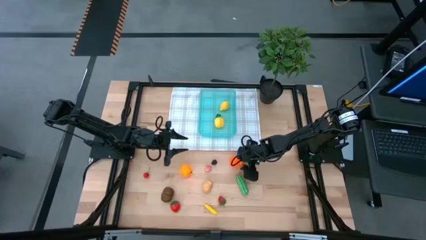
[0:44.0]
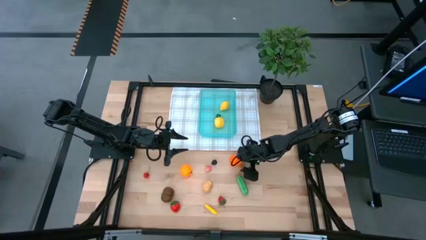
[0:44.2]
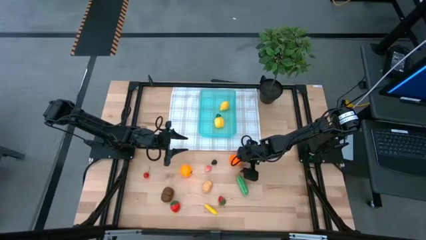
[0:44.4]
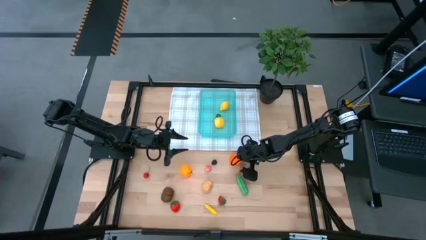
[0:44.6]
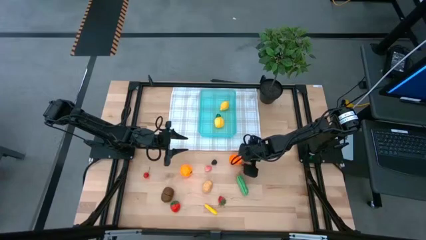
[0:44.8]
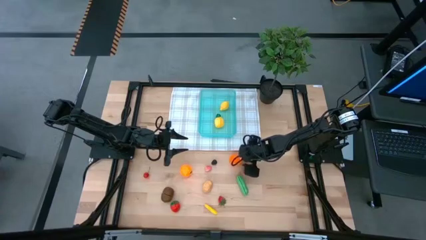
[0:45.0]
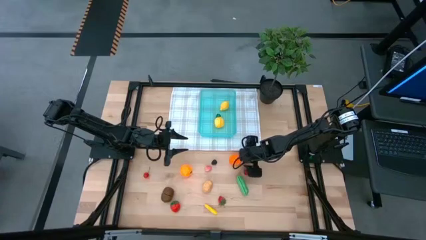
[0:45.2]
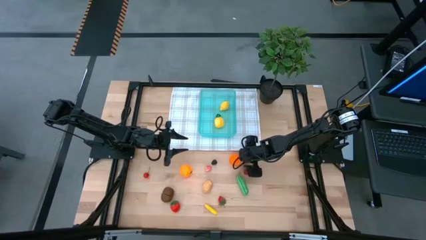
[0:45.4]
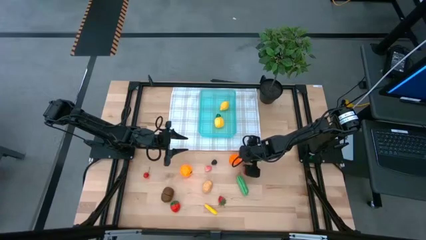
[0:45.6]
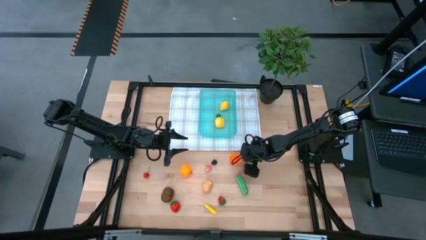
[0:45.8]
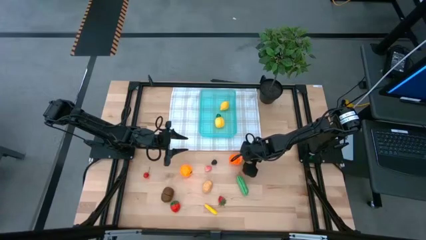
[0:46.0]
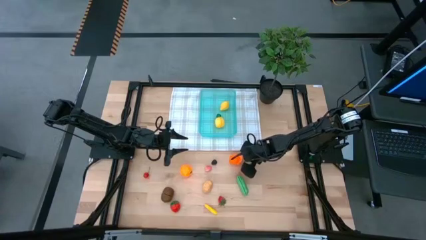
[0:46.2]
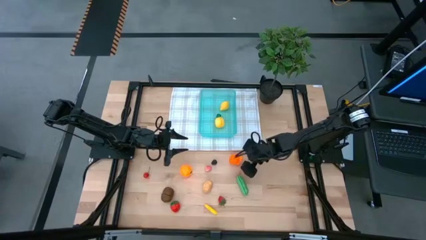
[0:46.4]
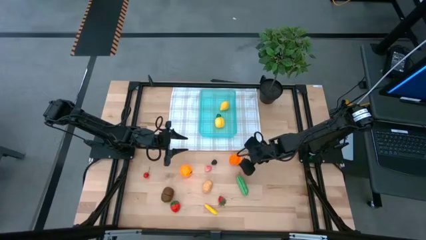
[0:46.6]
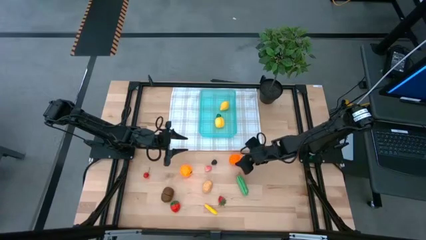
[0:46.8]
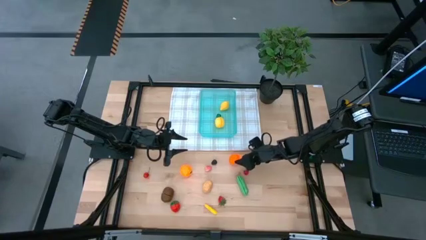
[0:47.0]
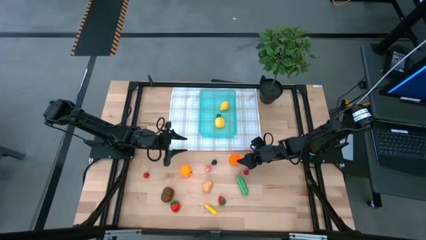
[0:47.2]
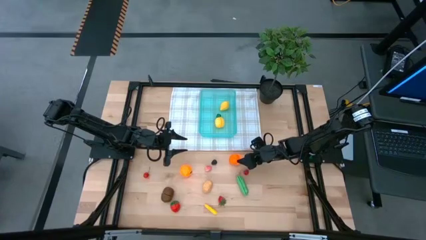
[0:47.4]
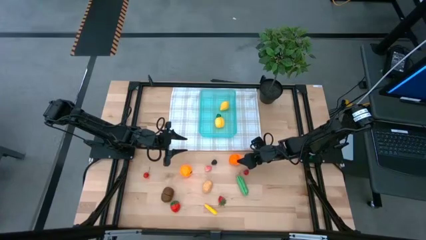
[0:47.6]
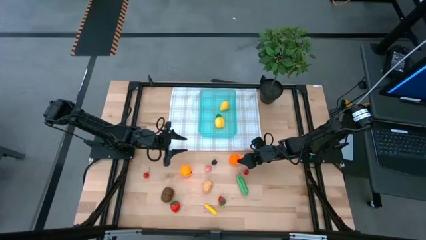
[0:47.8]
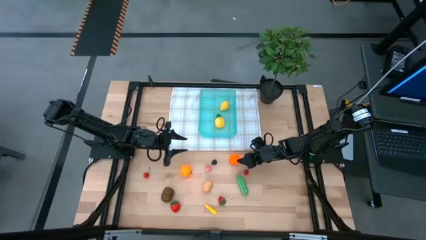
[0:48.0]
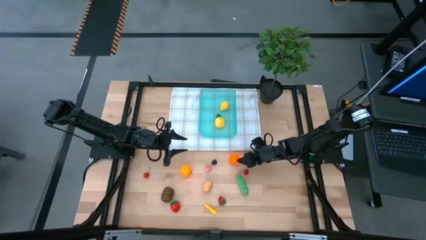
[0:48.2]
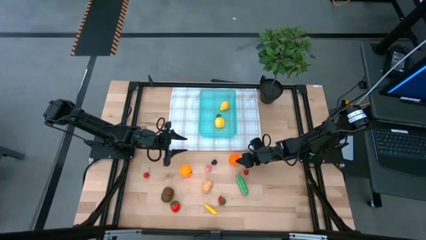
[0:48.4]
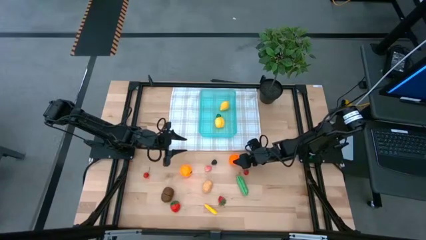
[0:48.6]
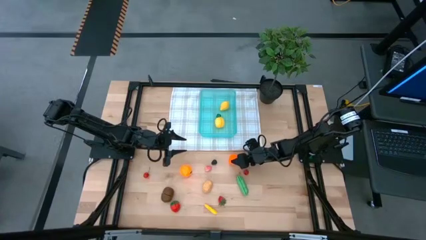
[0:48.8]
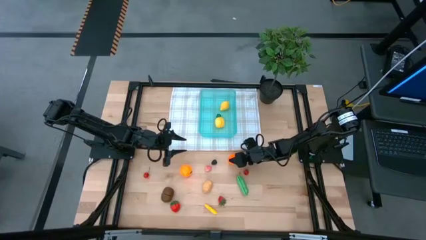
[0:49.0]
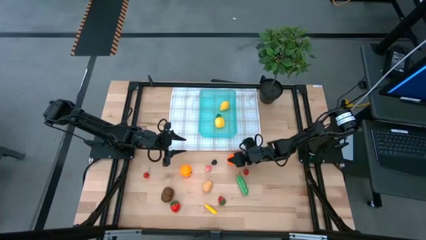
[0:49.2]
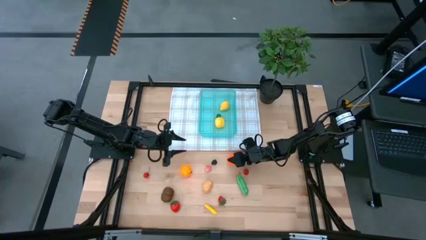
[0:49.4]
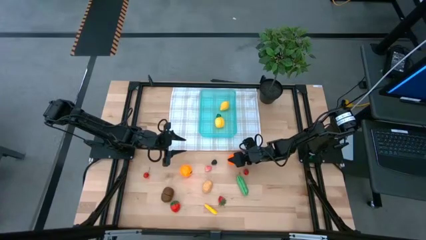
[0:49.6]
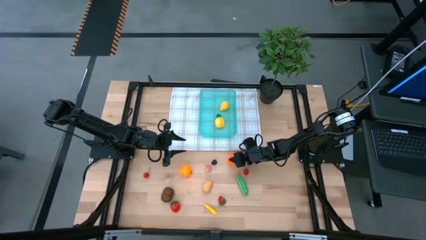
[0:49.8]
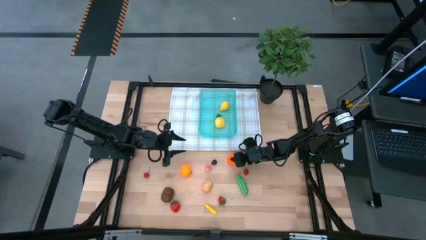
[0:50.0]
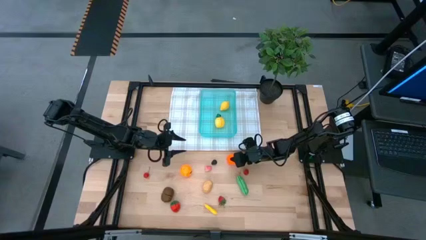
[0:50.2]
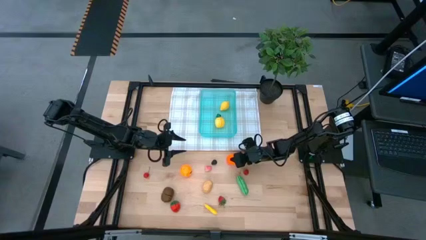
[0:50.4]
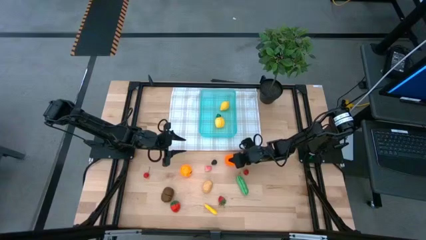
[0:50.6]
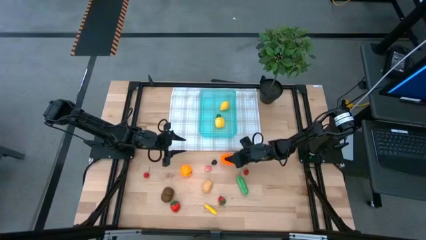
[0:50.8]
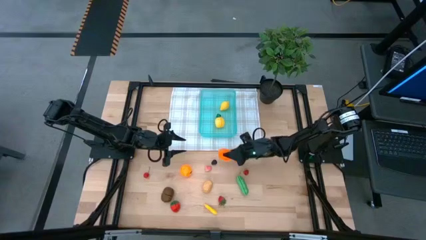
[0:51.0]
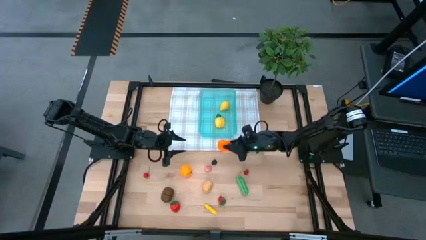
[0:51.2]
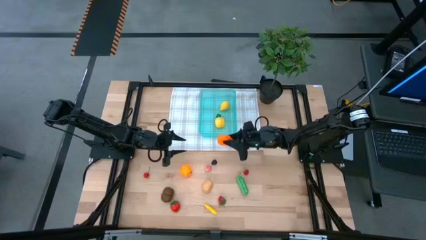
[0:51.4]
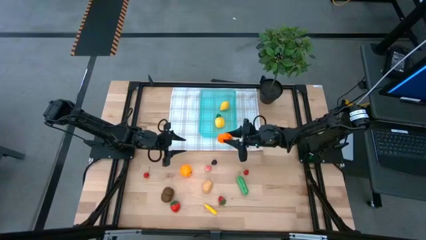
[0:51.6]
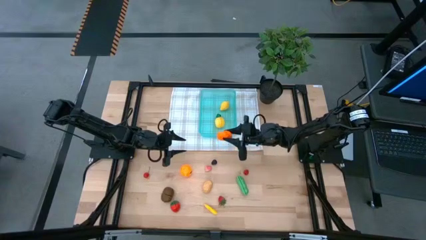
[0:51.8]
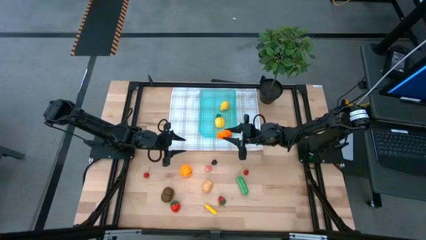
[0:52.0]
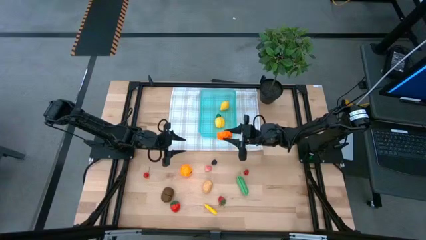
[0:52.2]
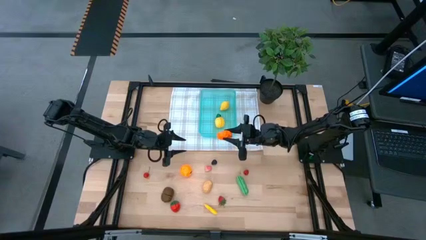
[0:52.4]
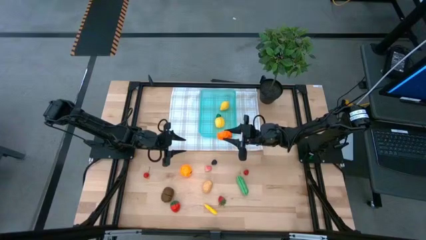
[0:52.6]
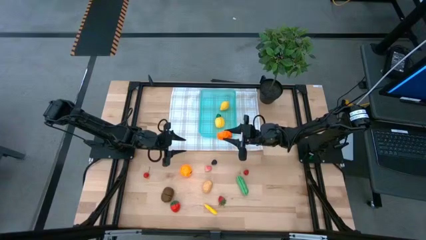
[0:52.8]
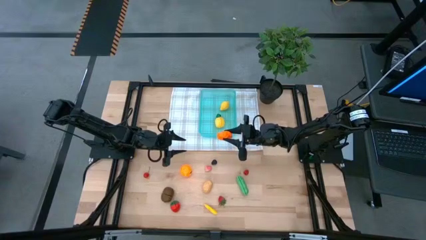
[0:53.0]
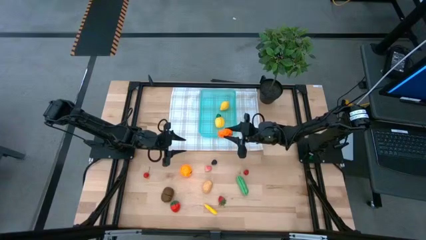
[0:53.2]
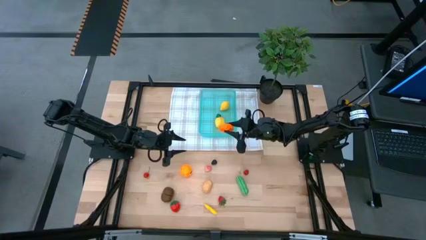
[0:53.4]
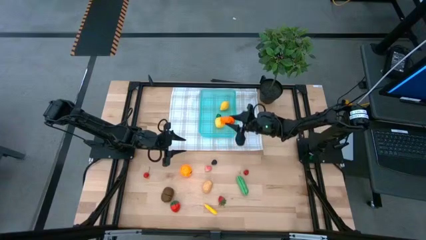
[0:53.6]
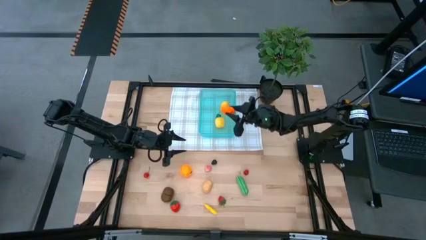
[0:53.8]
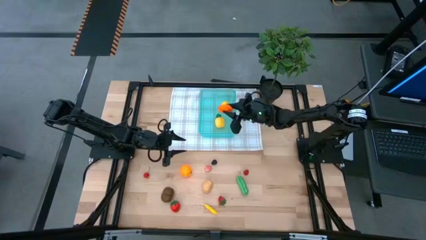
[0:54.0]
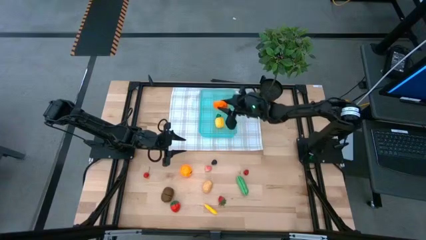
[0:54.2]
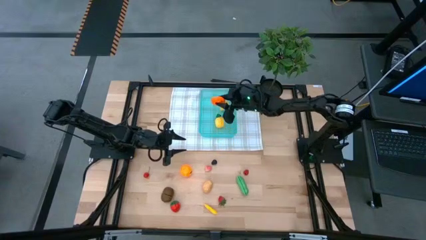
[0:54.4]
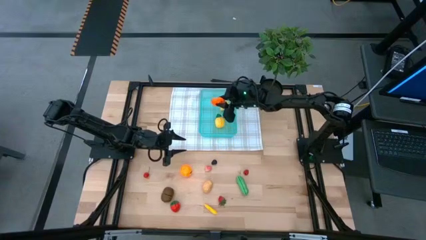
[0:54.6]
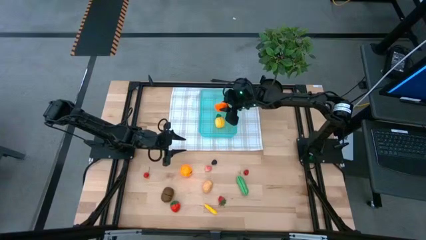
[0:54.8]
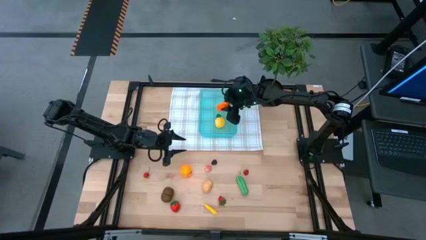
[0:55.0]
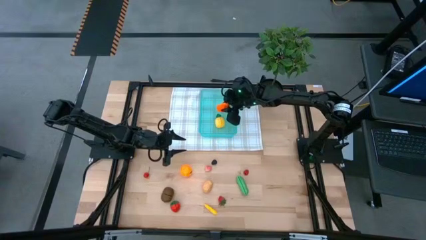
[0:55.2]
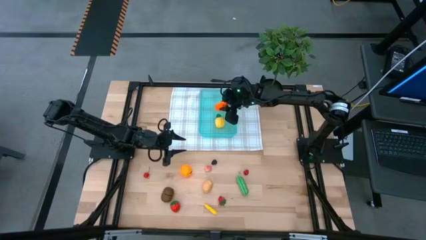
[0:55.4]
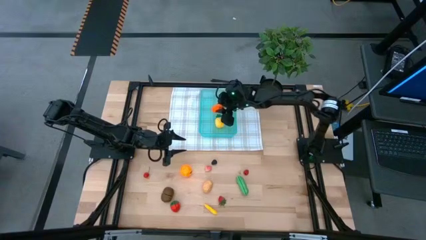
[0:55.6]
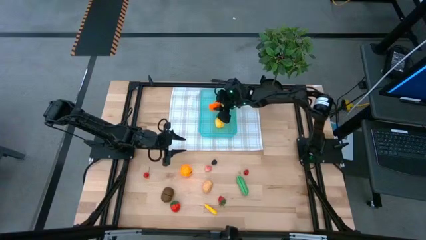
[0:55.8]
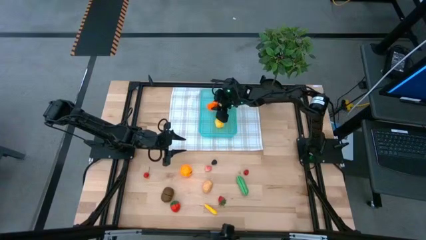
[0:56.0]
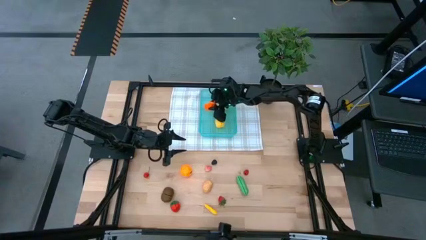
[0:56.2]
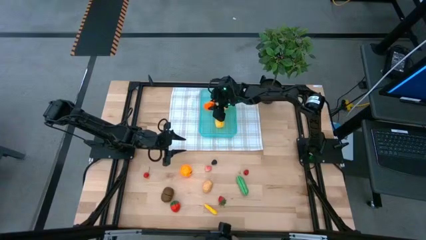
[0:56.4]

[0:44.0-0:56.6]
Task: Pick and placing Produce into tupperware
Put the orange pumpkin into the green bin

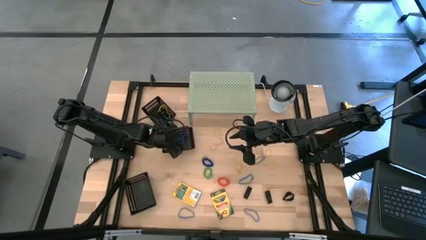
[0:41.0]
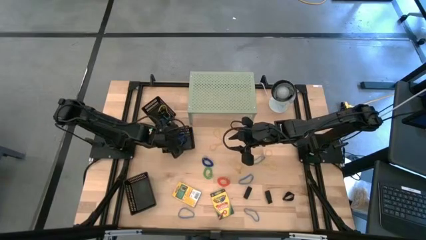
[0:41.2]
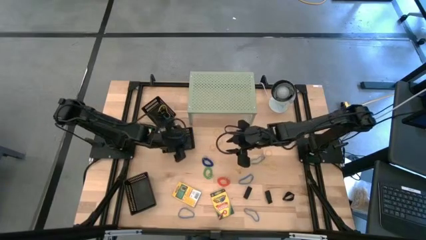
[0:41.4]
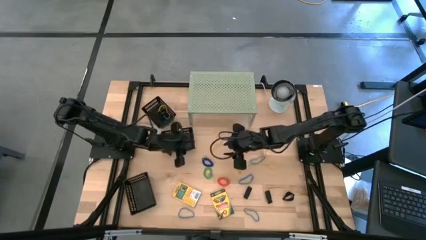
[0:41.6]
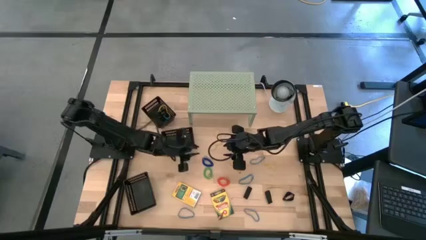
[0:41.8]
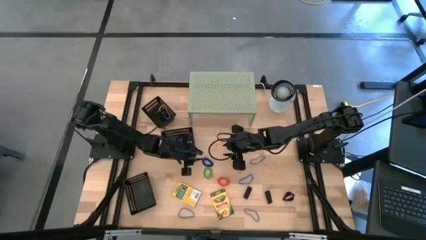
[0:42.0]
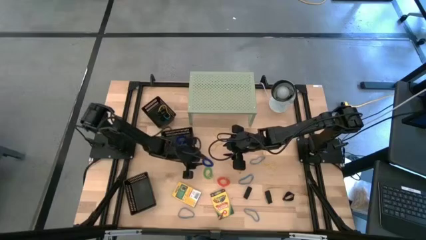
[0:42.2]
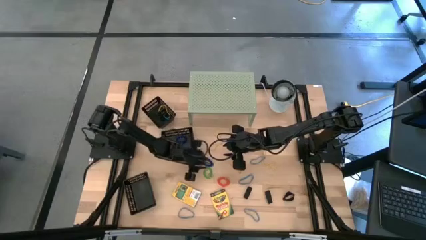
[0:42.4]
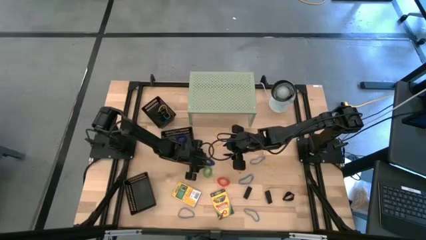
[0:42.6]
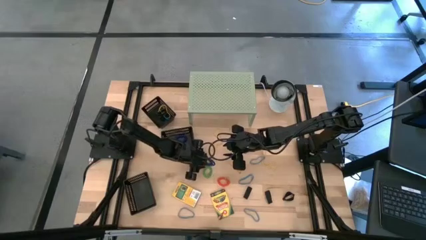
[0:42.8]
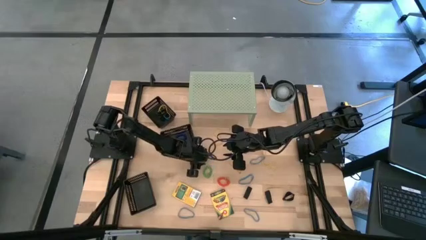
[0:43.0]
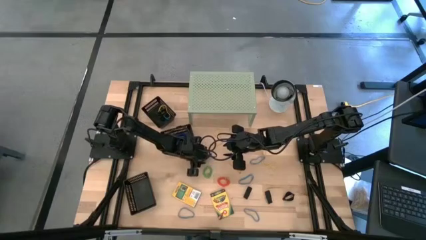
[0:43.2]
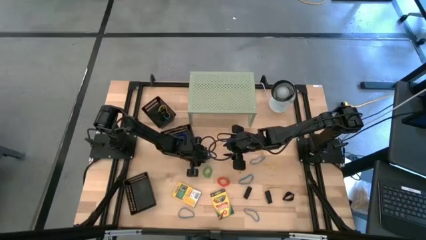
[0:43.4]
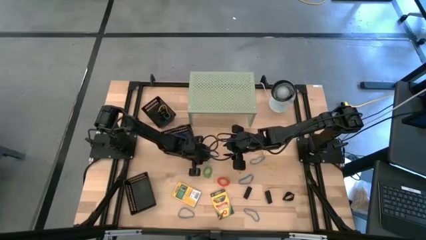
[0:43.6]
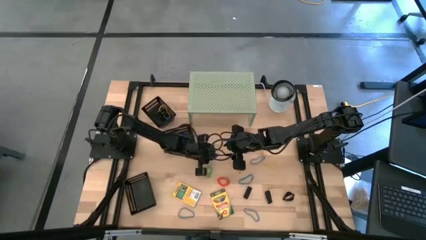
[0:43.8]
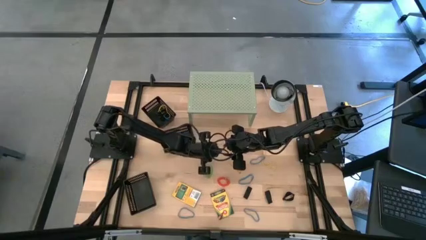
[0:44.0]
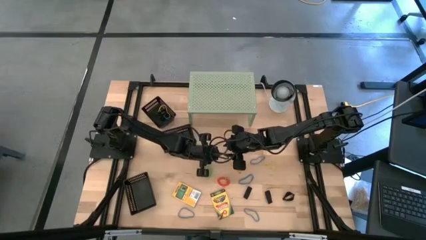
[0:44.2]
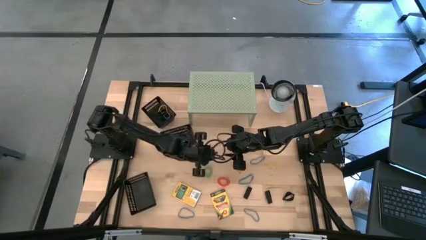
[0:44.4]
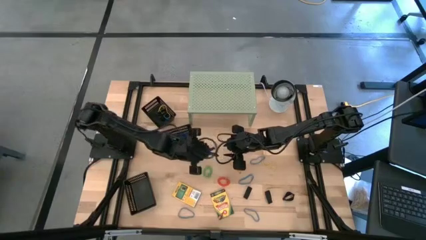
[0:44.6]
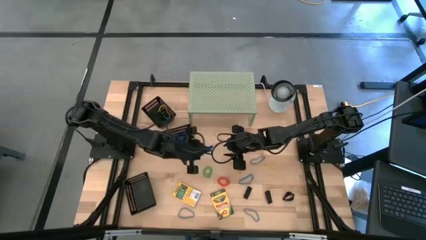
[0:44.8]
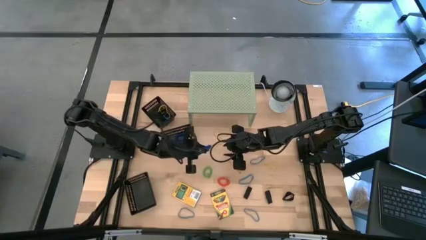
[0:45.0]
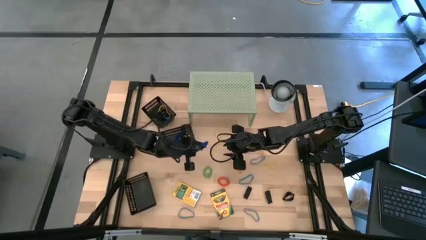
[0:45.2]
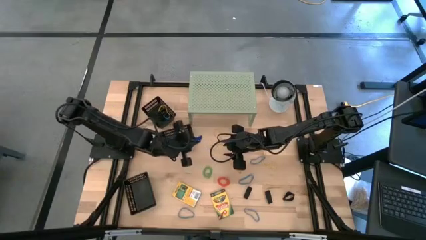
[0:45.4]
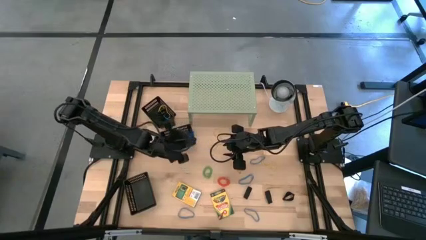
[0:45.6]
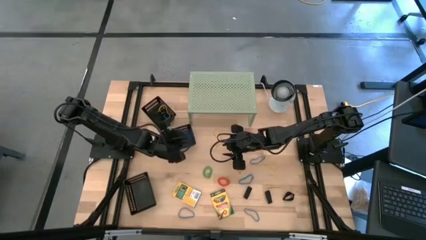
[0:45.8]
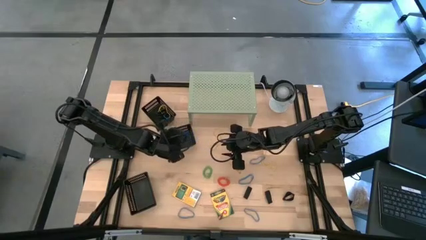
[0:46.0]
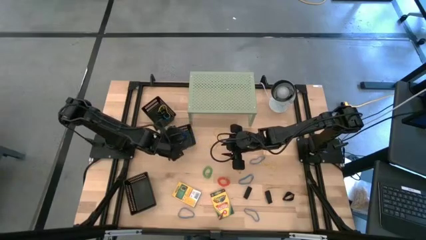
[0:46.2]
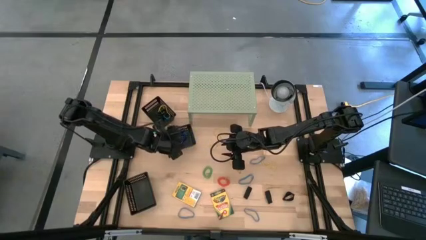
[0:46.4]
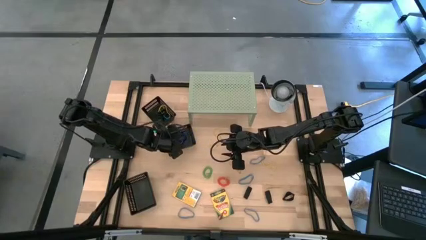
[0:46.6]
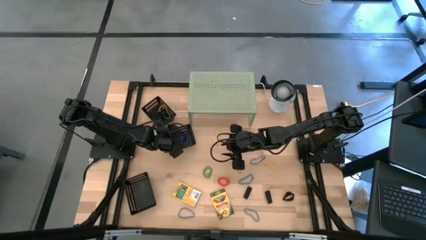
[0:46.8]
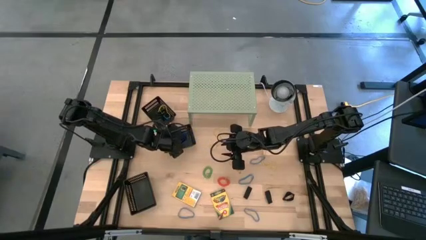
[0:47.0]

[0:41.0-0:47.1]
Task: Pick & Place Office Desk Supplies
Put the blue spring keychain into the middle black bin
